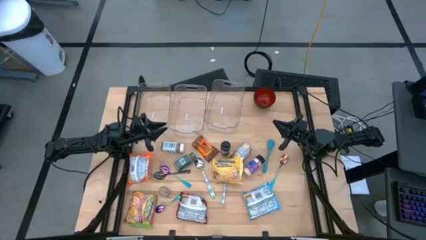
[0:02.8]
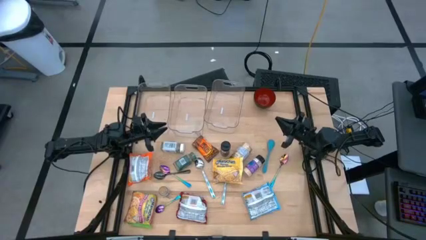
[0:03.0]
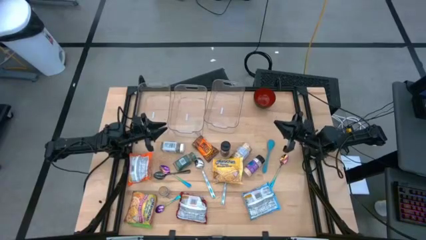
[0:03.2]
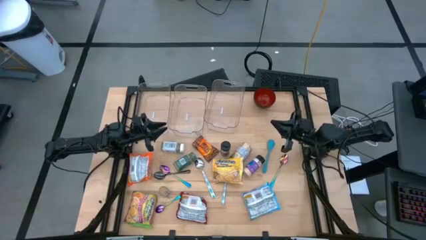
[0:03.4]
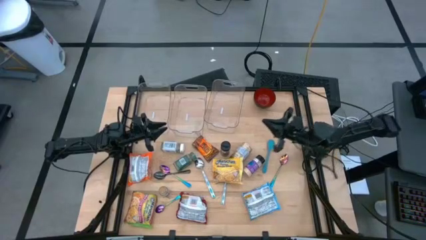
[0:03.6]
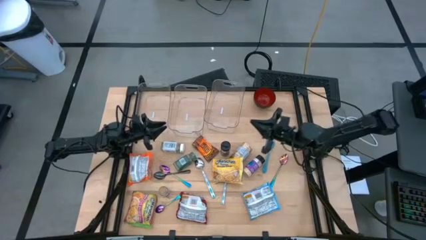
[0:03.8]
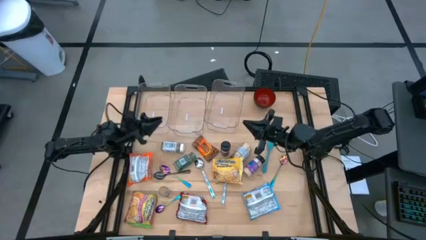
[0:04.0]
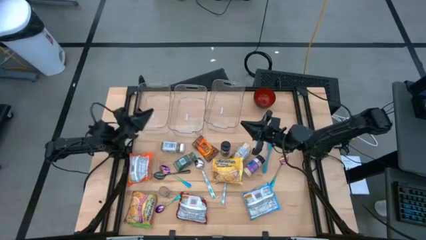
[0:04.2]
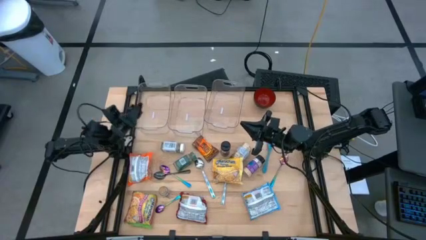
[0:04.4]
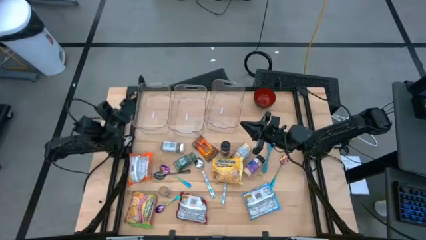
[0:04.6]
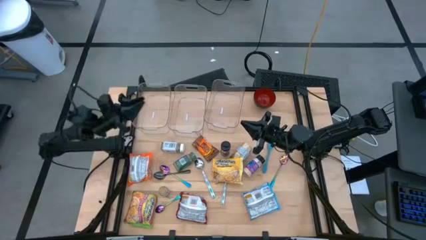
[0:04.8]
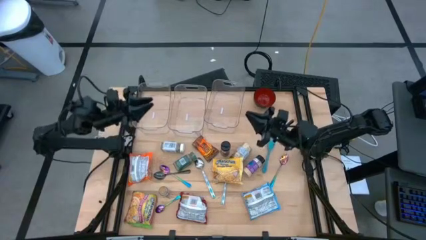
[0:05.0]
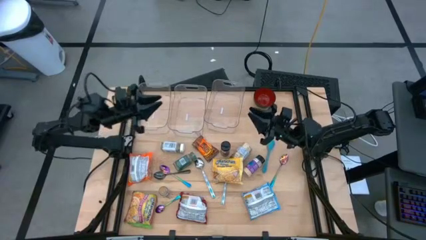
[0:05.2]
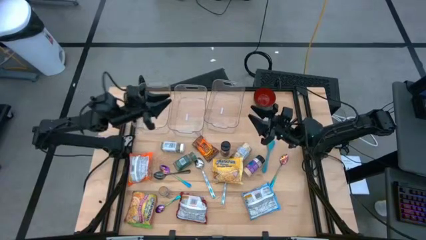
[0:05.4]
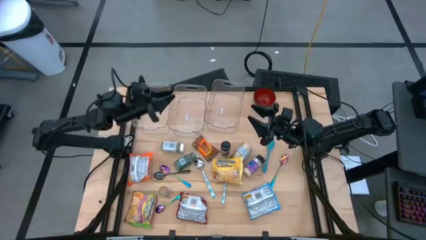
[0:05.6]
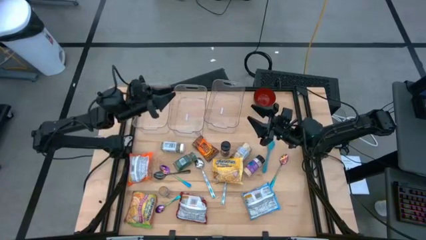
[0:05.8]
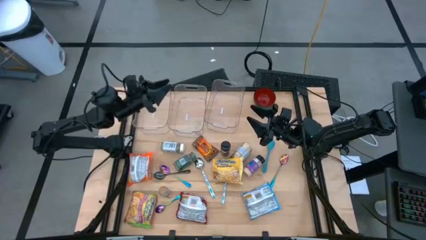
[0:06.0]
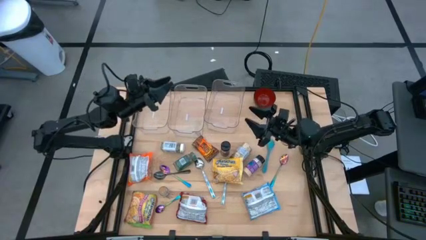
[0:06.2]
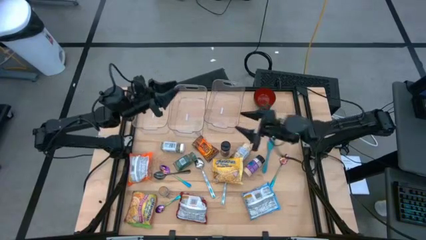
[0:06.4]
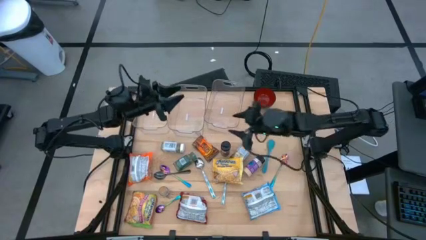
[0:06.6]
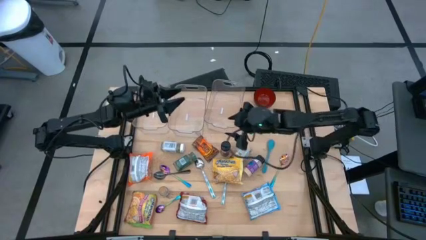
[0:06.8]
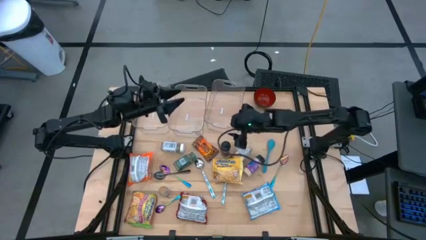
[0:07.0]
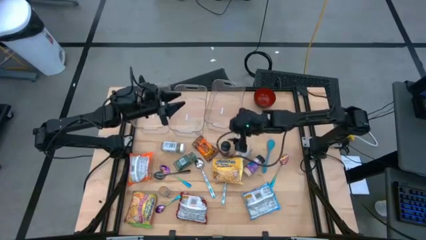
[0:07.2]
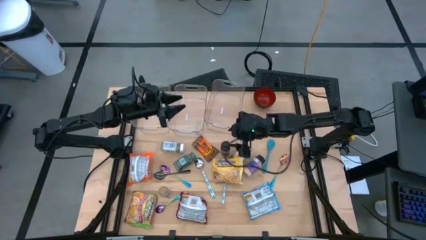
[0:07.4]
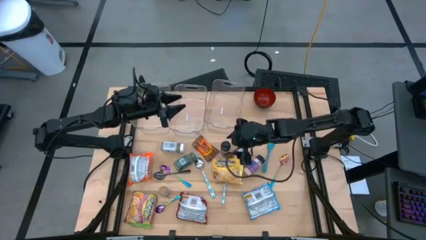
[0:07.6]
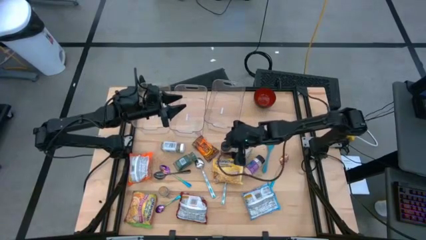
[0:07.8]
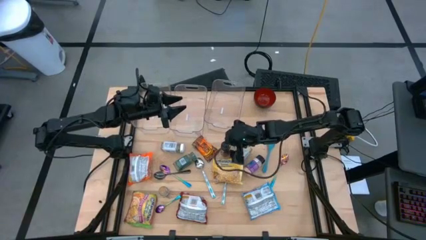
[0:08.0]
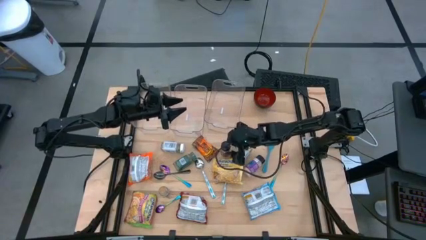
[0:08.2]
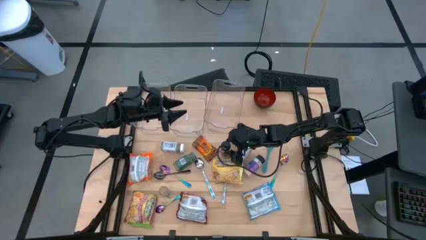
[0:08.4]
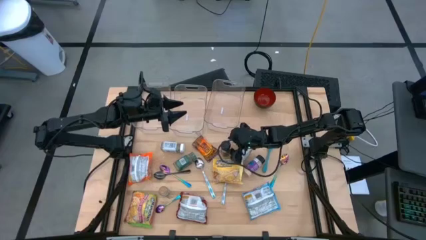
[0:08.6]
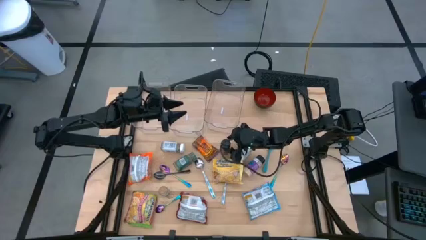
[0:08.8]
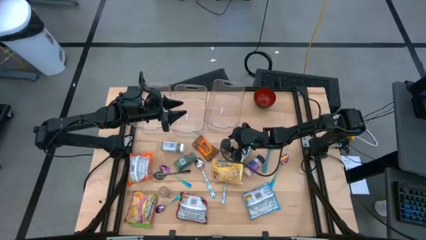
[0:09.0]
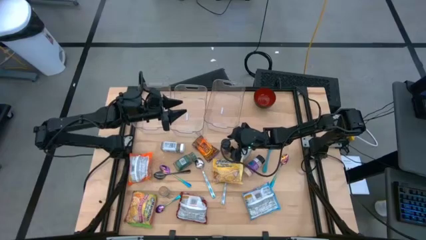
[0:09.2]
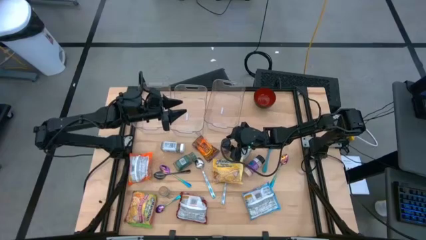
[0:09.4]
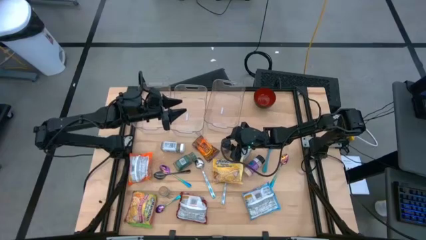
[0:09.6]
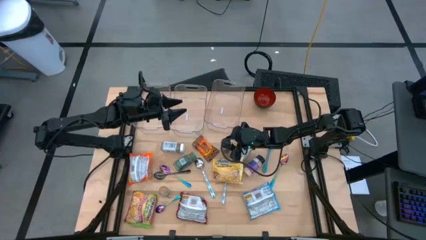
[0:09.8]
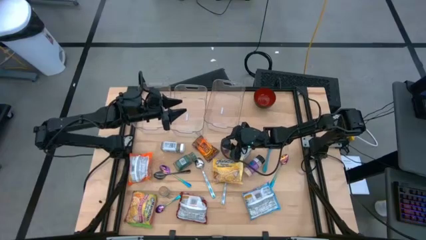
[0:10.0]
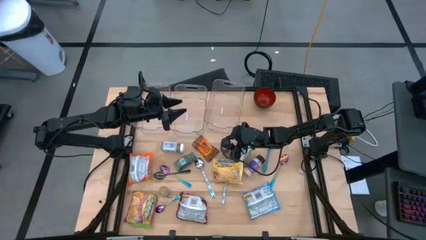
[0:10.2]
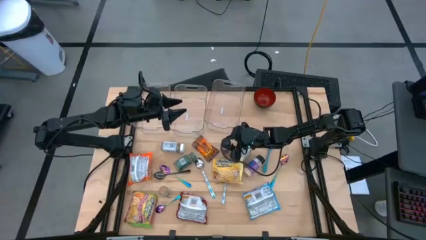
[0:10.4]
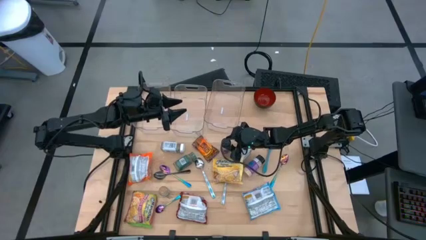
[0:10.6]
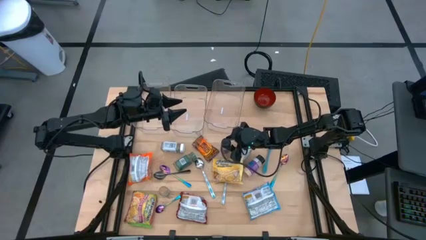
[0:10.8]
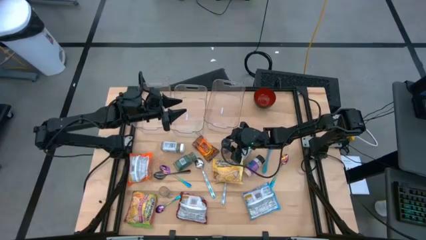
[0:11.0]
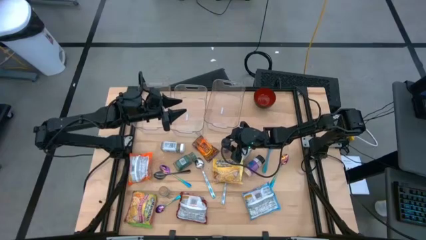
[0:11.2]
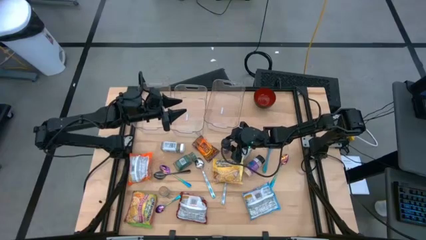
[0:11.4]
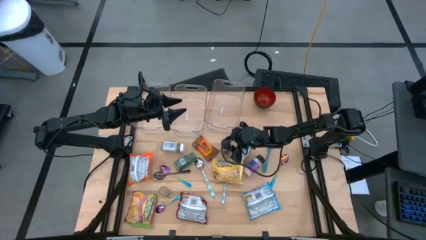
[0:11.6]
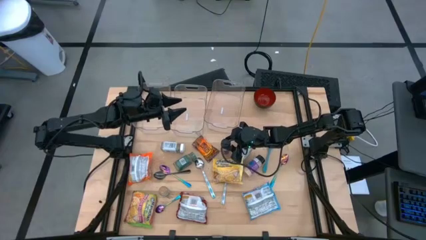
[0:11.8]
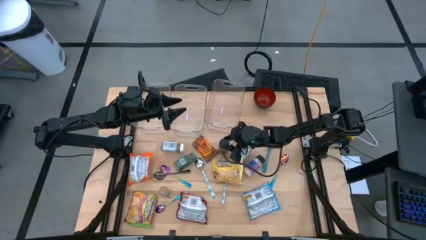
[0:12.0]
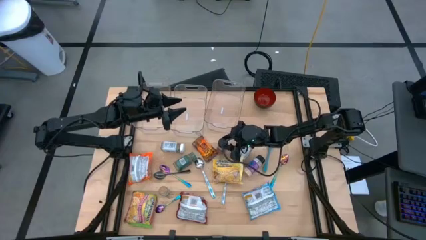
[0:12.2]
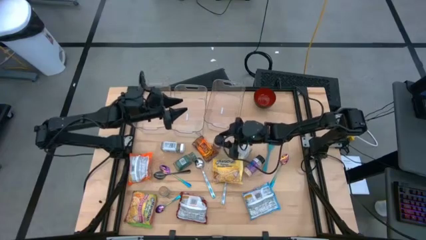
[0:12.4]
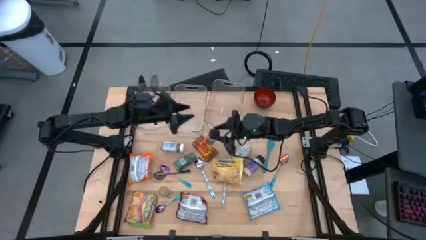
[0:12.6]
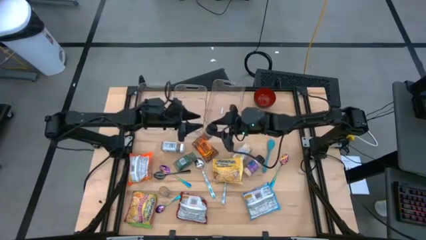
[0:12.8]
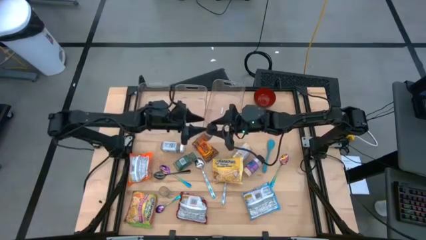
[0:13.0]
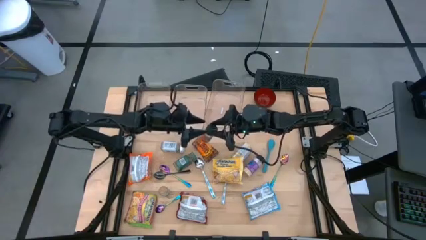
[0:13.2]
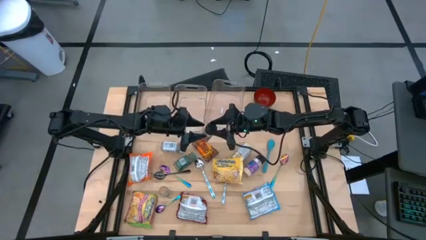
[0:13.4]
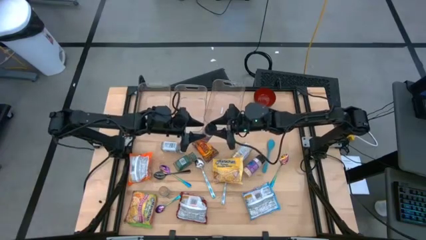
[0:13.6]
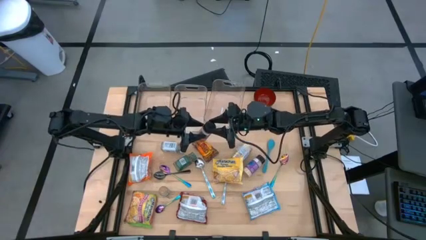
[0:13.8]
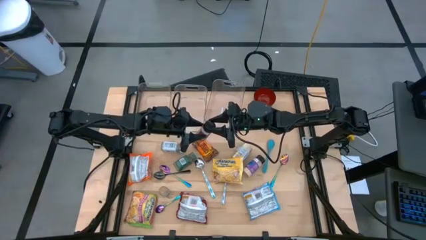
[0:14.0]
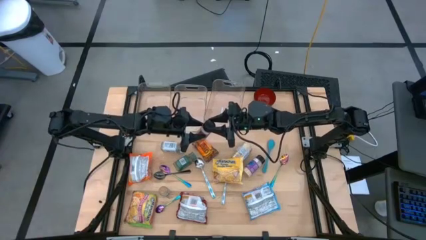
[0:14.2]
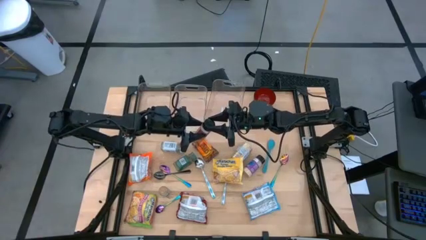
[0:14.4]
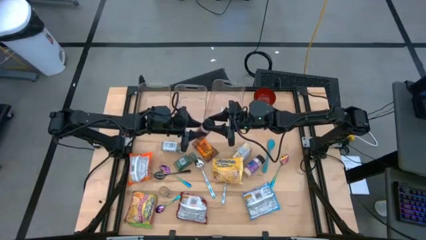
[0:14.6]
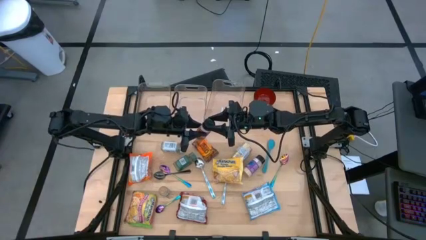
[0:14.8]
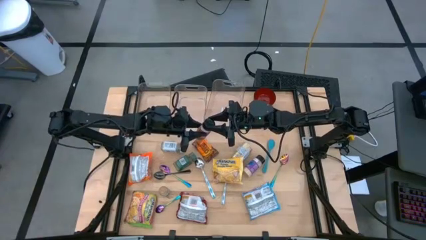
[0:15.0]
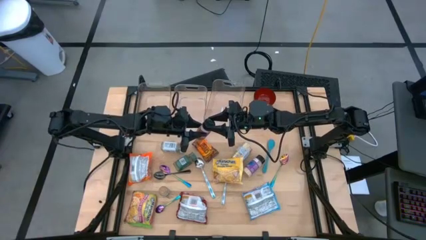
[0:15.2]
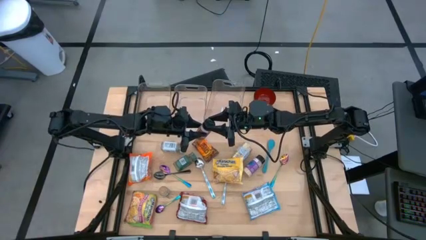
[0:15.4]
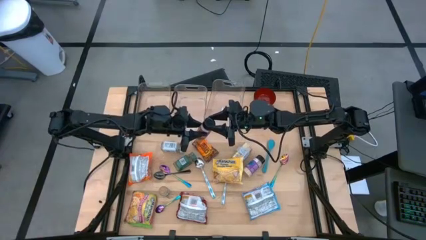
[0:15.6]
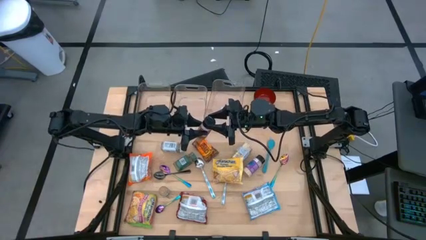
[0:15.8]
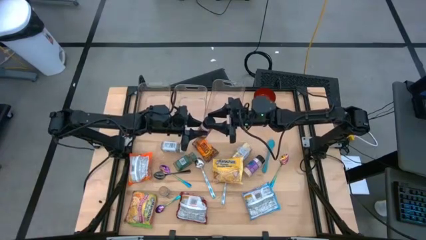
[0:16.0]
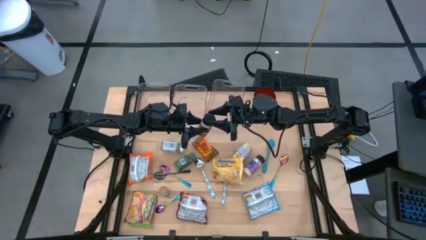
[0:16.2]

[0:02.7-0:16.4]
Task: Pick & Place Food Item
Put the orange spice bottle into the left transparent bin
